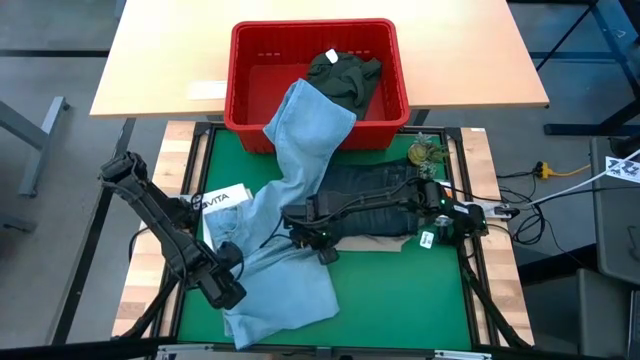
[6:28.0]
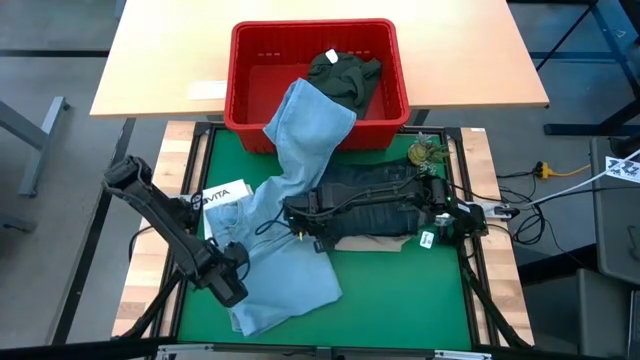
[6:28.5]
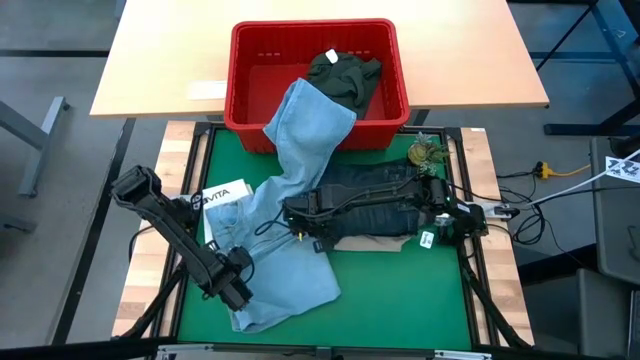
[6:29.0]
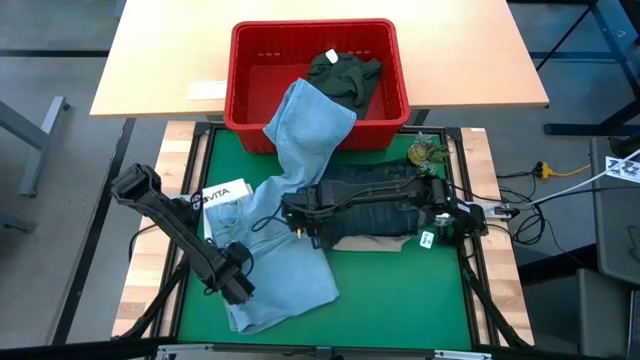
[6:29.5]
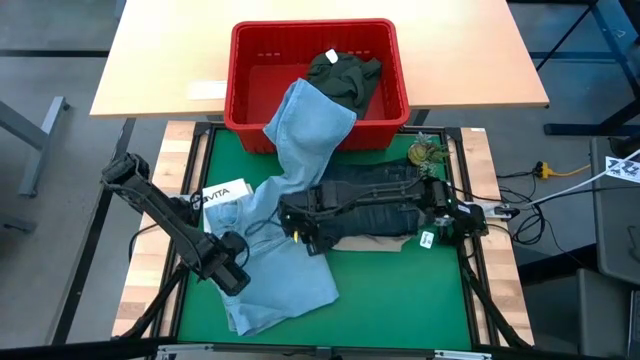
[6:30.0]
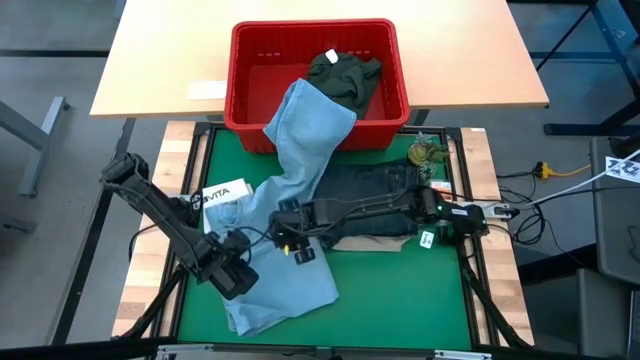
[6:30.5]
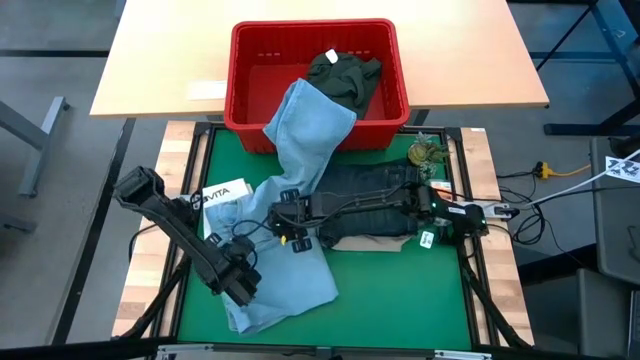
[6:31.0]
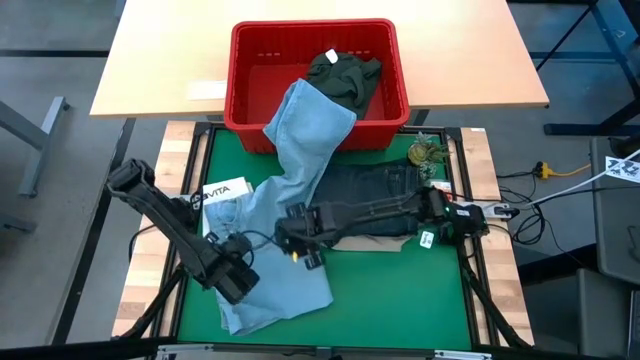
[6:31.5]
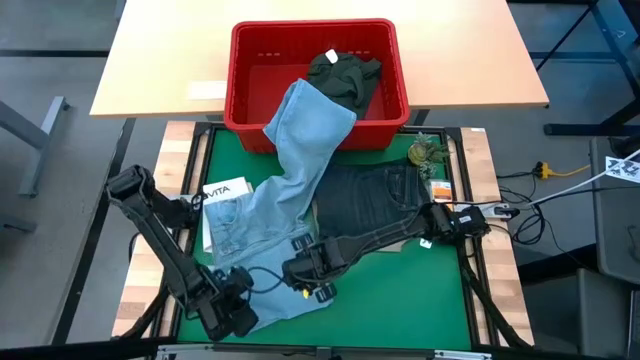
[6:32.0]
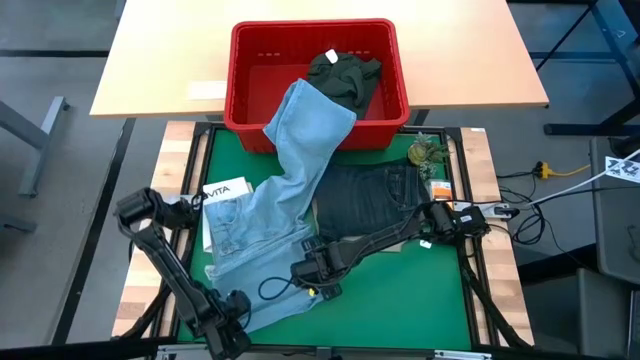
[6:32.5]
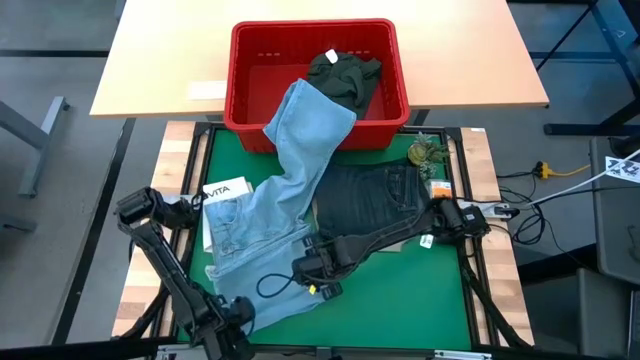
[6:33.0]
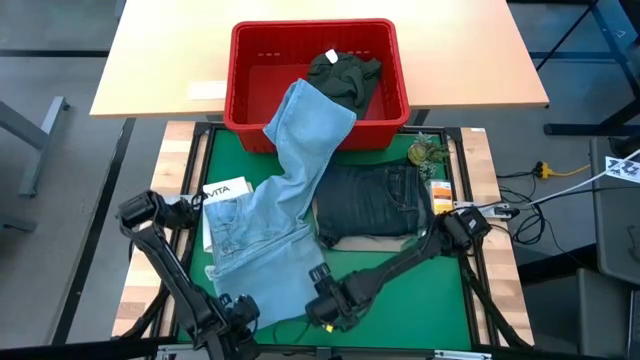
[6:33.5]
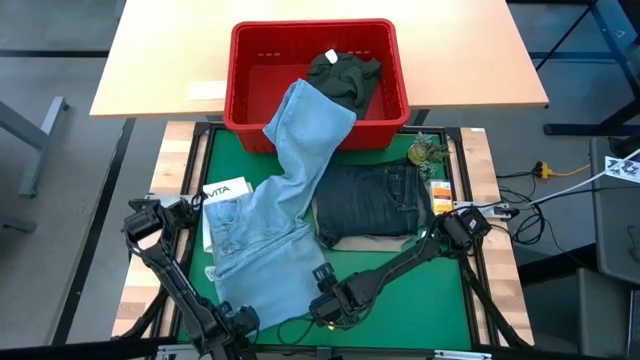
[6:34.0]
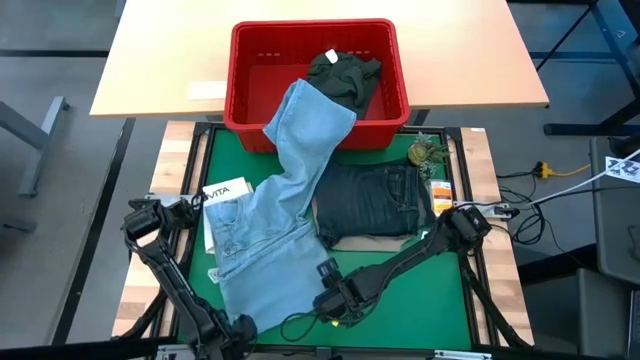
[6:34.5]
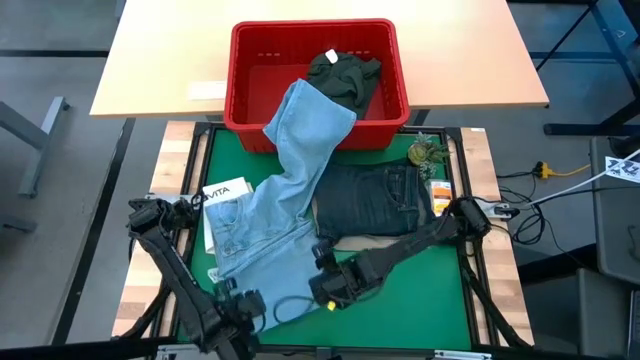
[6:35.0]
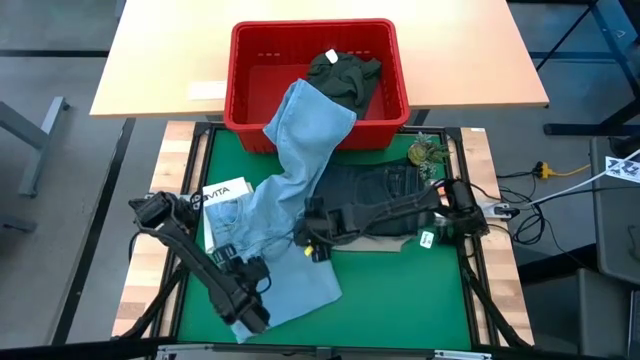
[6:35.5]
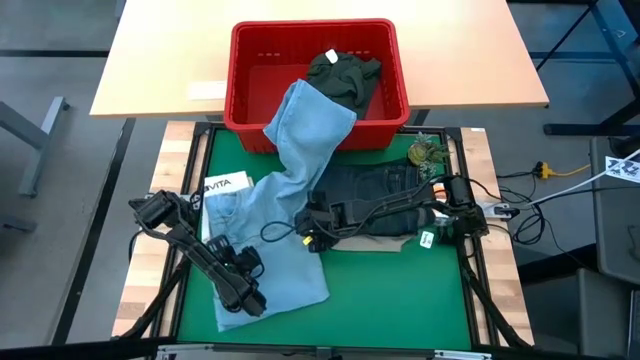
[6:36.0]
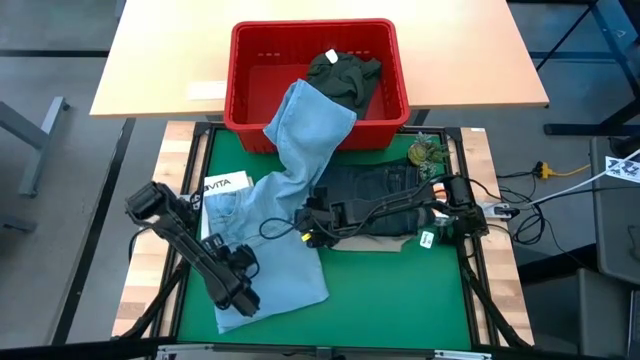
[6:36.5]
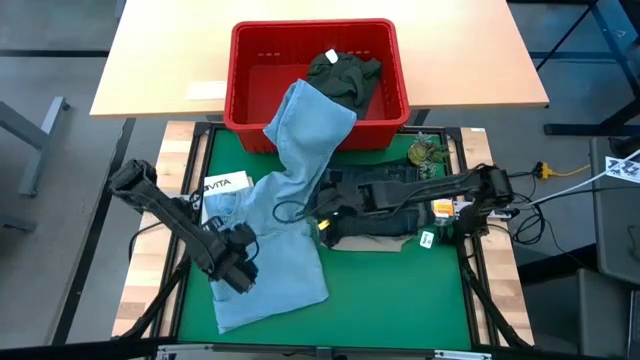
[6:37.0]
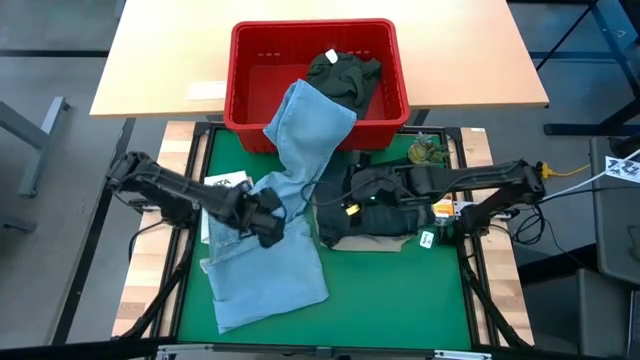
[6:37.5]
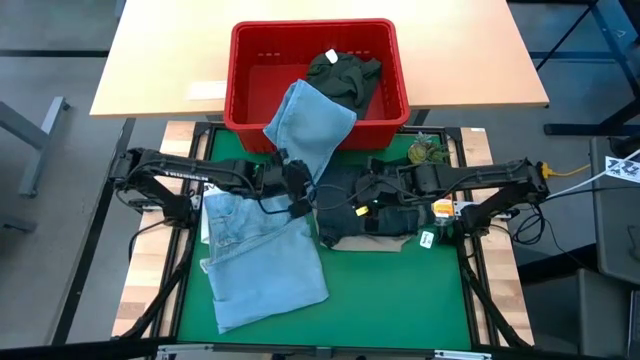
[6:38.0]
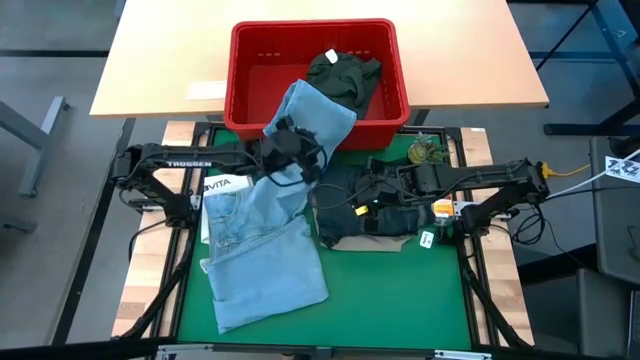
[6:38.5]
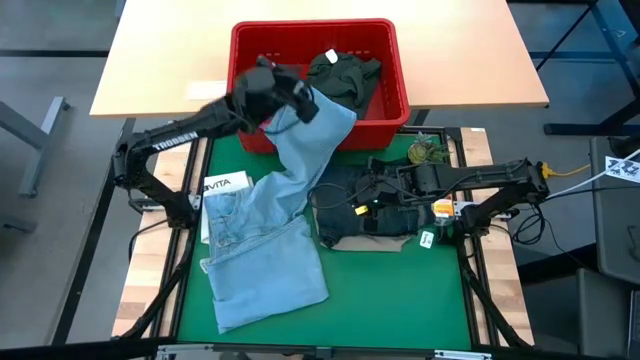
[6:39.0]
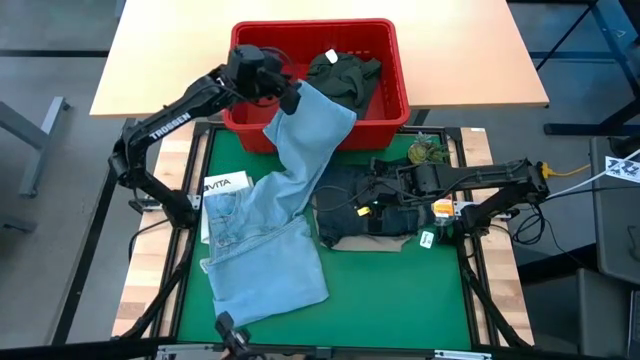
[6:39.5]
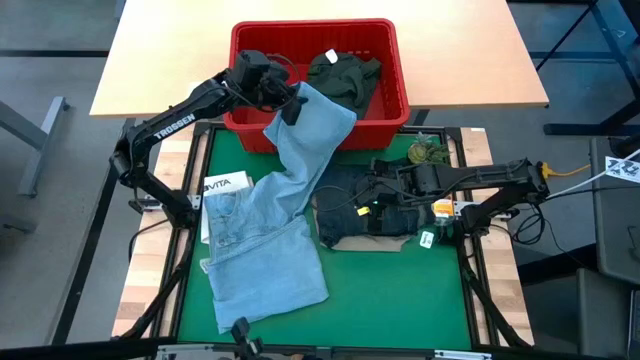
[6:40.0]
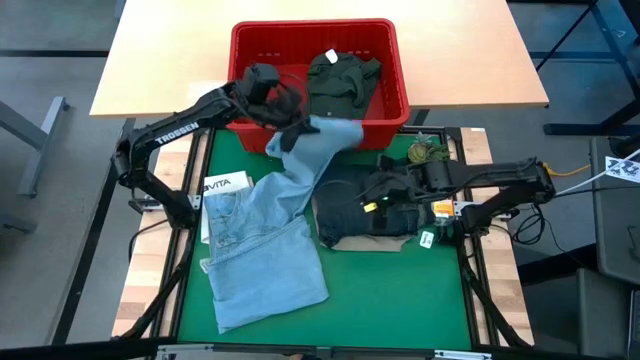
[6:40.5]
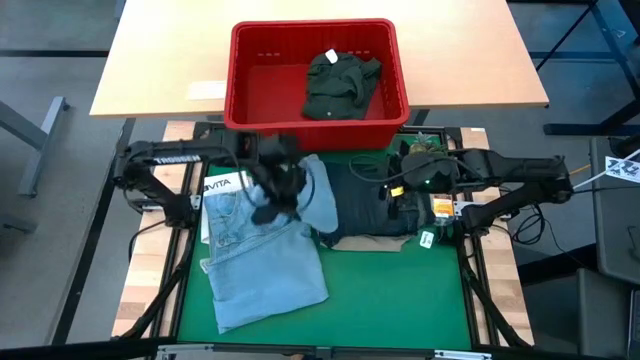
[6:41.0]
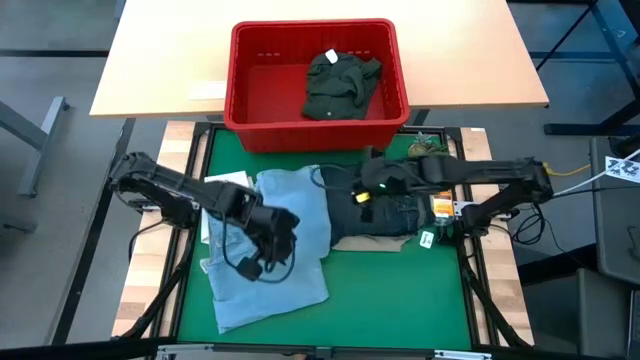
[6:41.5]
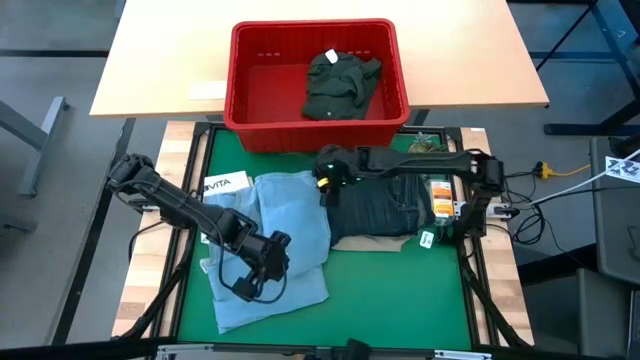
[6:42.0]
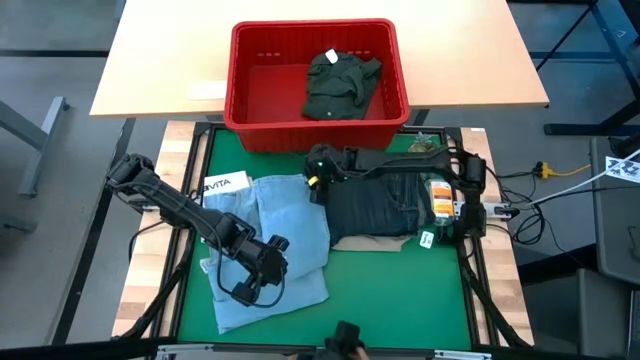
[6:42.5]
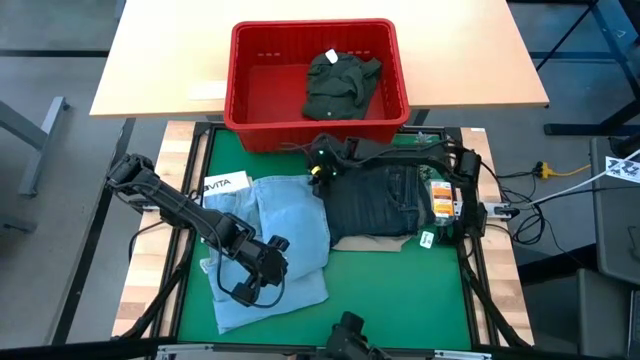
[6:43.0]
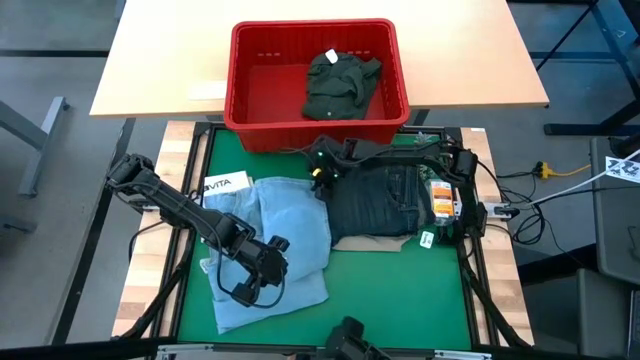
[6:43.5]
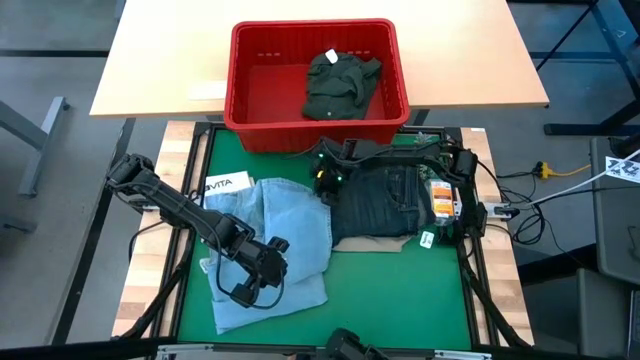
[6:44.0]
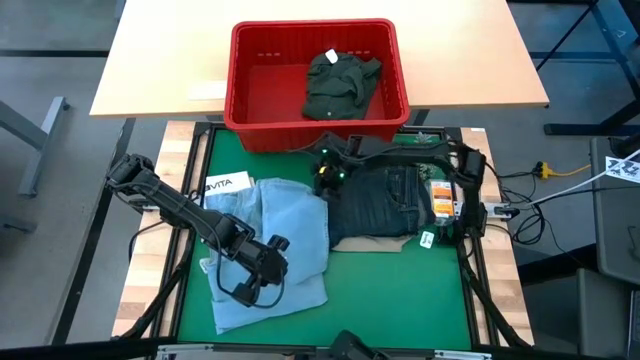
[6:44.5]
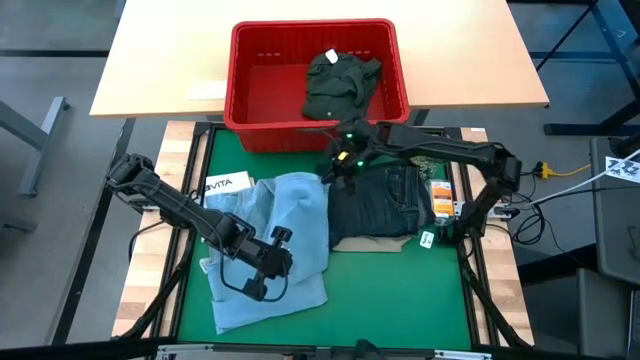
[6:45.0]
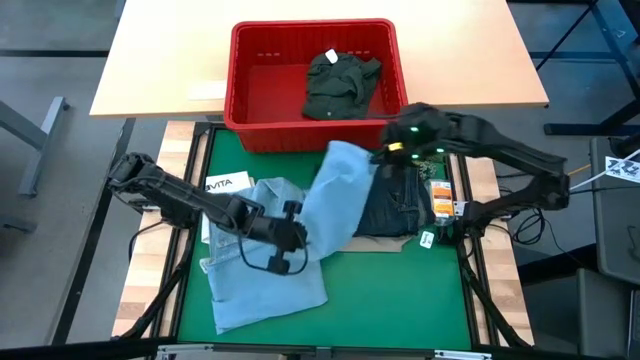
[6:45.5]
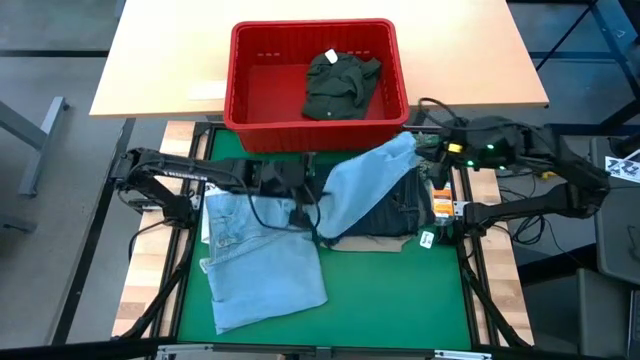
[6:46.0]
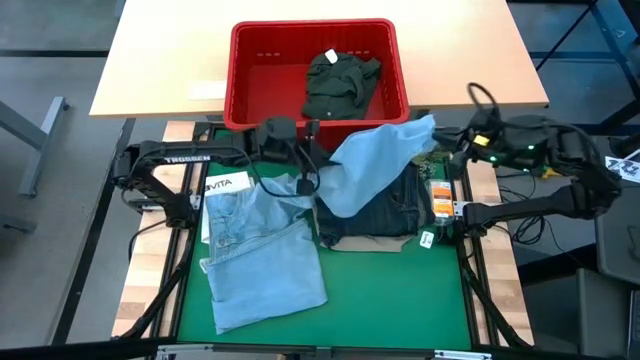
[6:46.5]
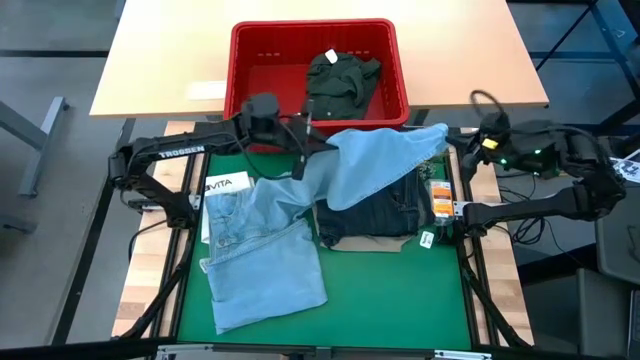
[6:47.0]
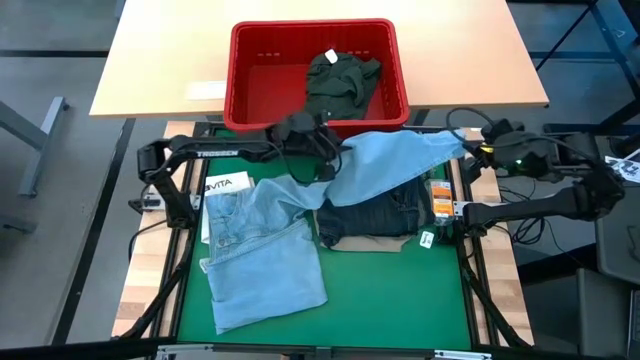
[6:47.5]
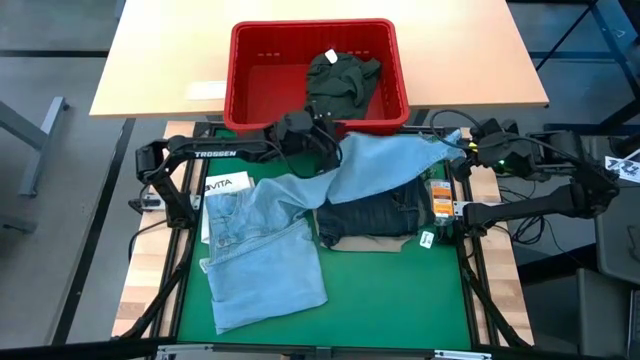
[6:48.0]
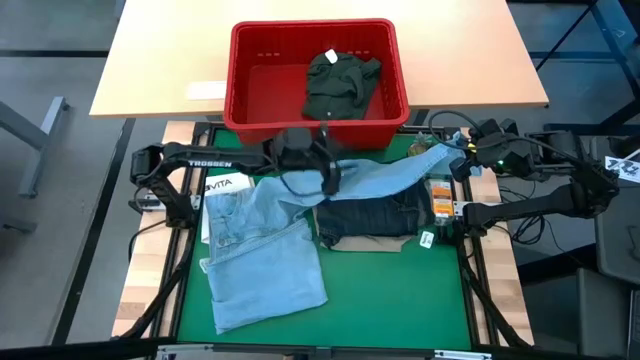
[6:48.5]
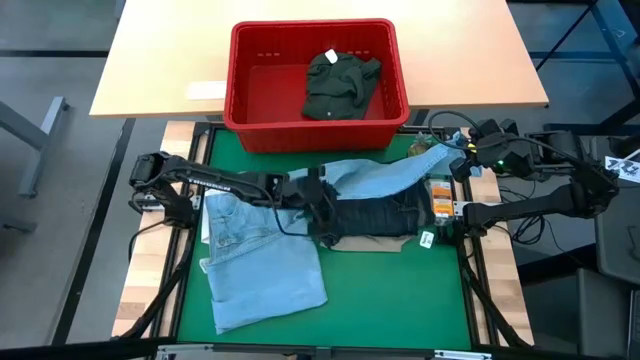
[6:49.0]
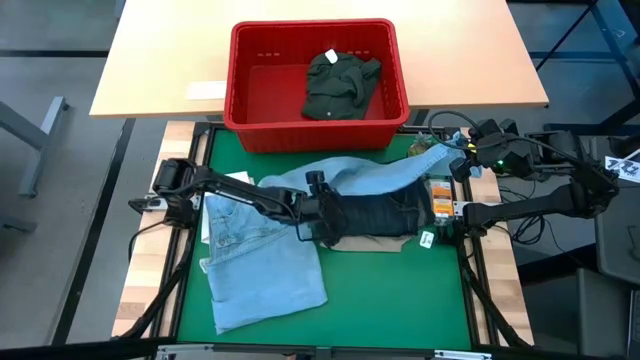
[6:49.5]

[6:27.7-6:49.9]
Task: Fold Laundry from Bin
Fold the light blue jeans
